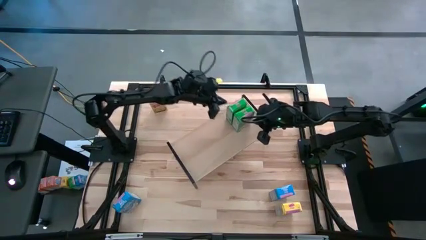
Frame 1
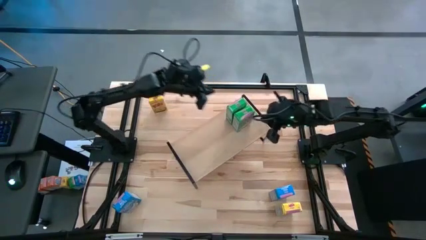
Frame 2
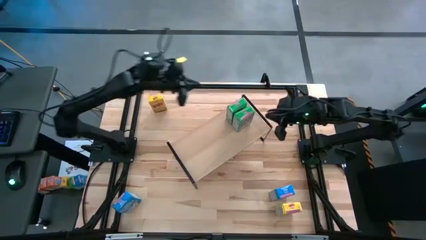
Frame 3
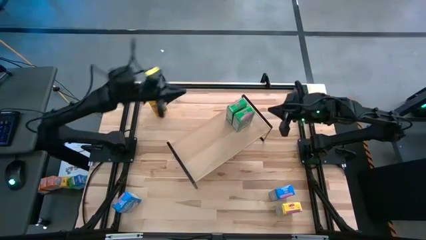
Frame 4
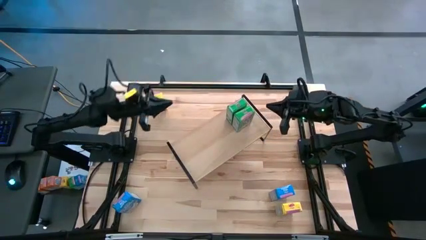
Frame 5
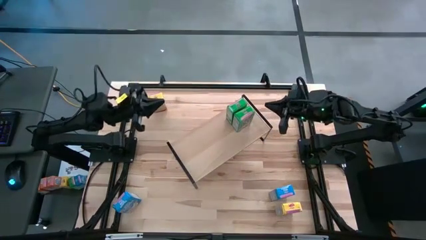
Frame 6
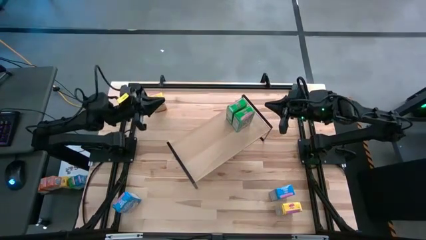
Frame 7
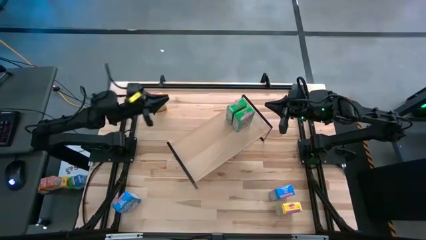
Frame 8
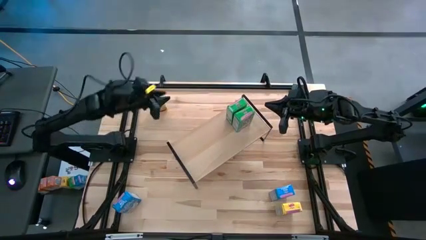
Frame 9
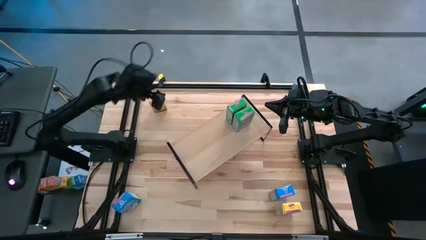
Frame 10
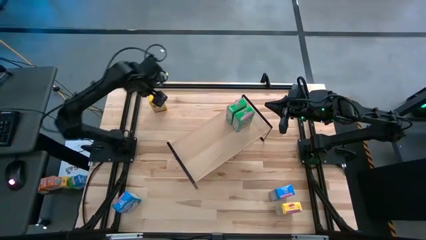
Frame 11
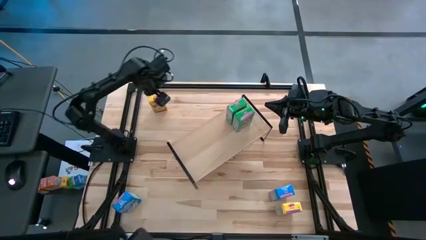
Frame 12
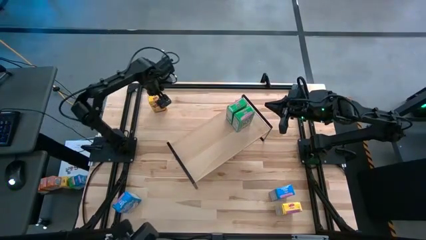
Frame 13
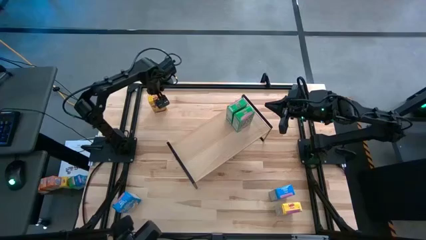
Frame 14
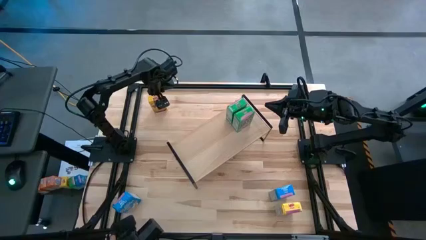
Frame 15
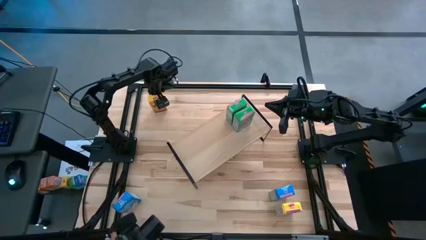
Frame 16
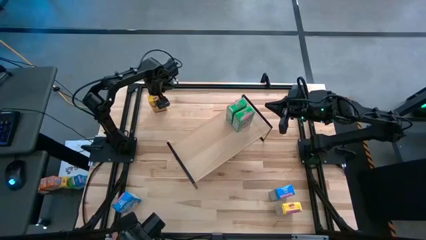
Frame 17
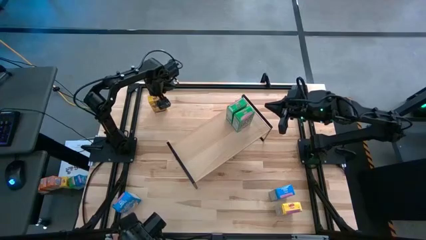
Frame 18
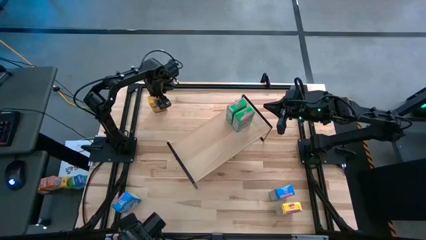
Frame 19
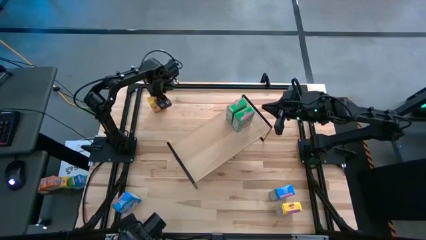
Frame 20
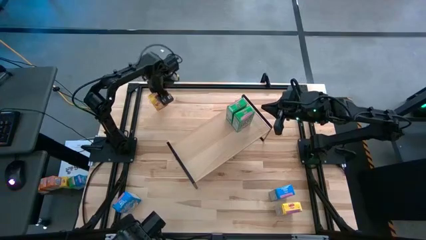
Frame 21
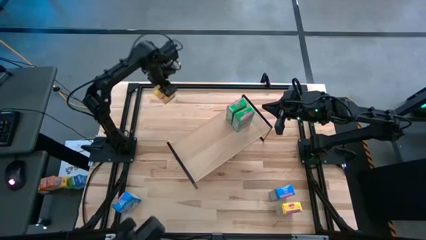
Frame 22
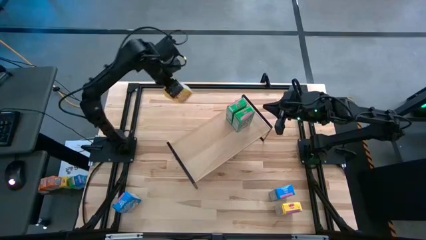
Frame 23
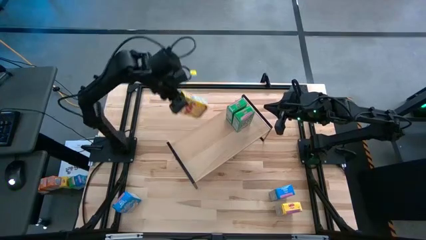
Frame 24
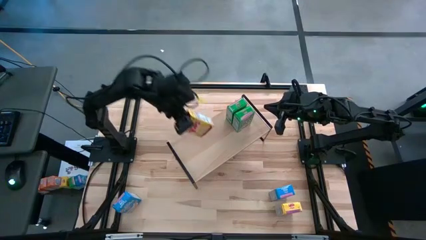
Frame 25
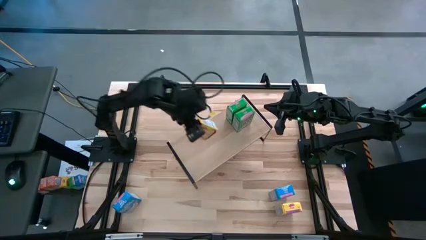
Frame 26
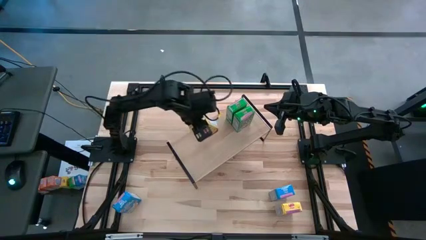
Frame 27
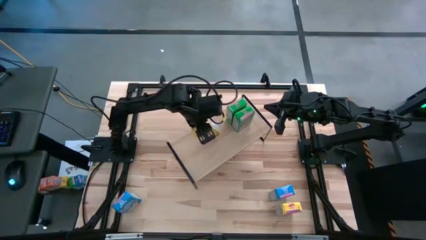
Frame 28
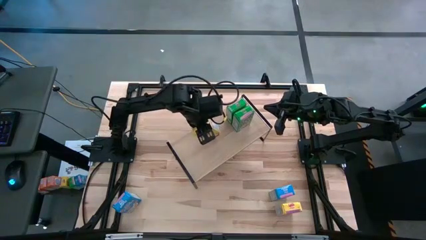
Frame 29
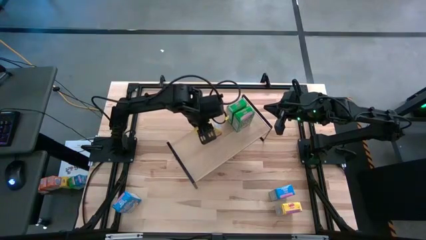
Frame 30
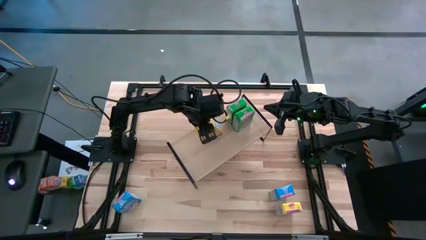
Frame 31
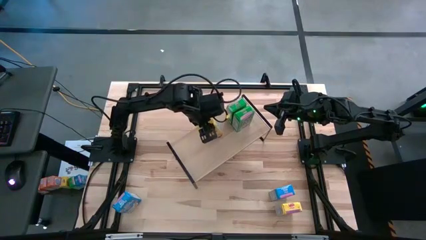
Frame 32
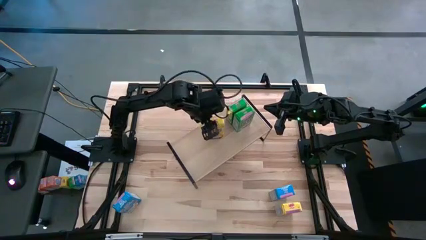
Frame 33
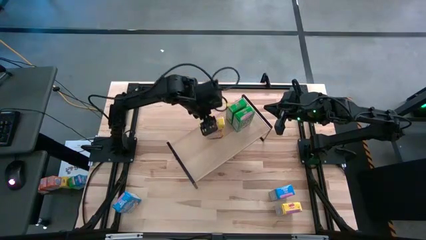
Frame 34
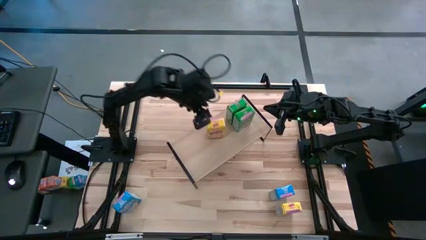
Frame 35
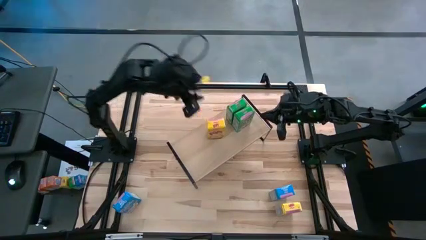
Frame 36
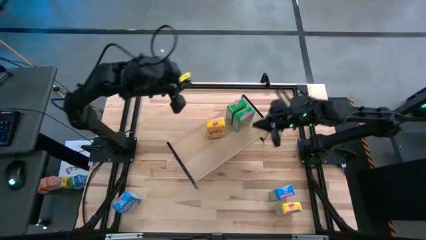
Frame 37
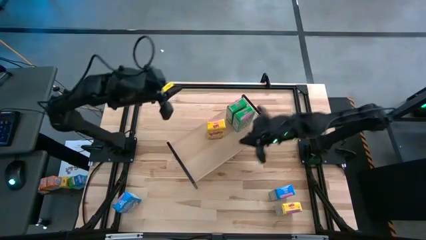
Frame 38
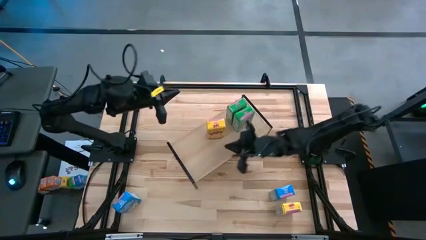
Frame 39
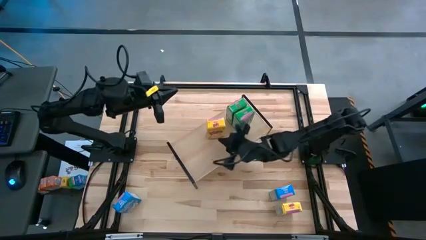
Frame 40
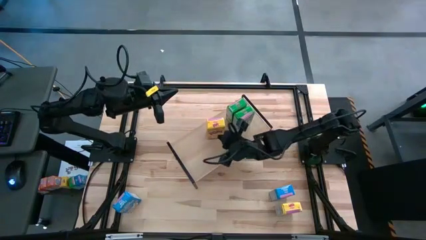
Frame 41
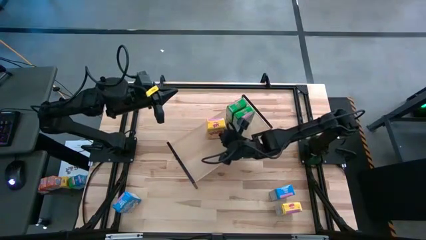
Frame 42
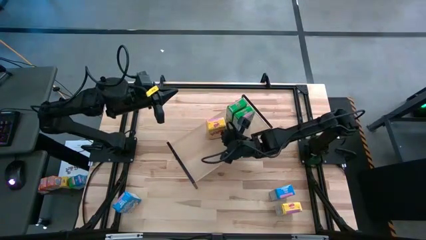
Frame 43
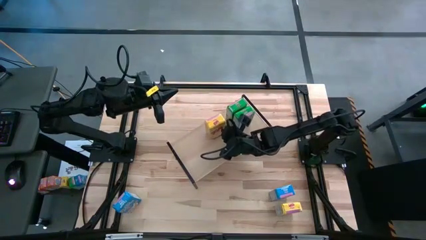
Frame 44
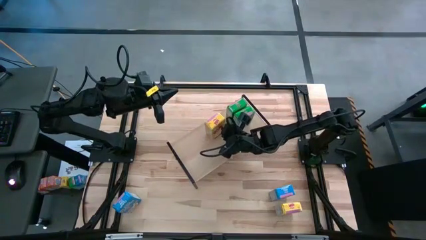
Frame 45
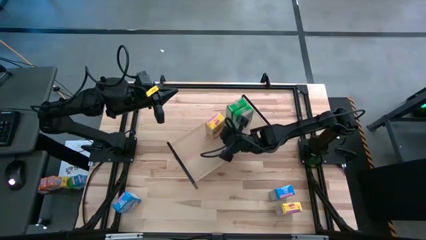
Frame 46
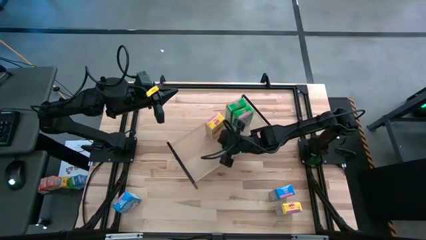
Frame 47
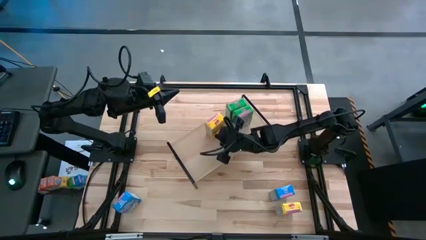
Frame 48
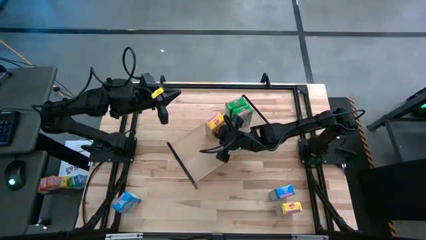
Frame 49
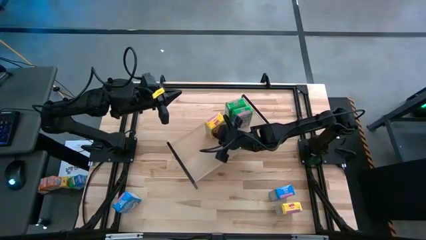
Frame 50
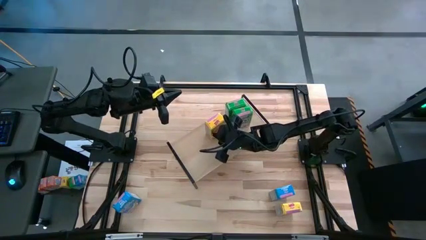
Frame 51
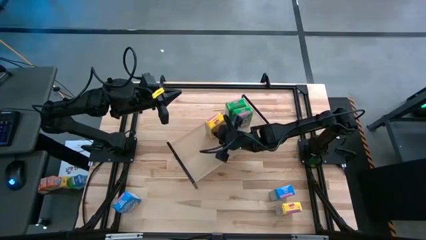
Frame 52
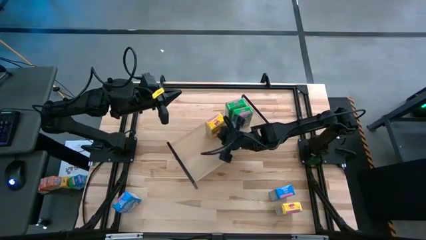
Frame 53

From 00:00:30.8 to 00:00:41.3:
Task: Stack cereal on shelf
Put the top yellow cereal box on the shelf

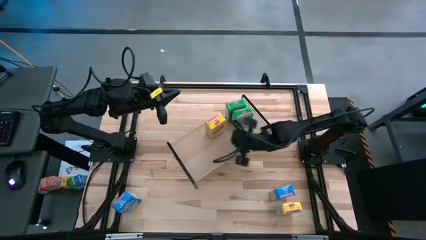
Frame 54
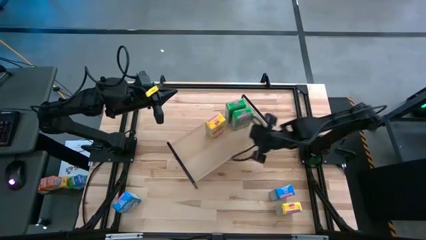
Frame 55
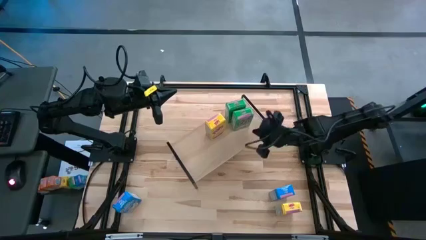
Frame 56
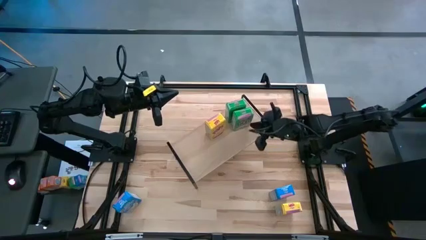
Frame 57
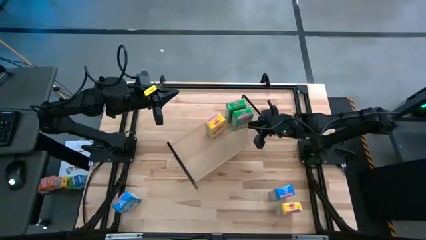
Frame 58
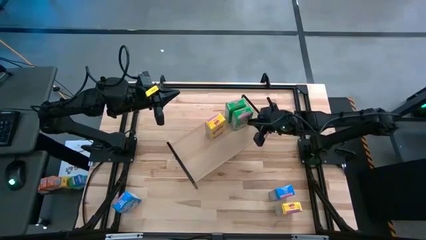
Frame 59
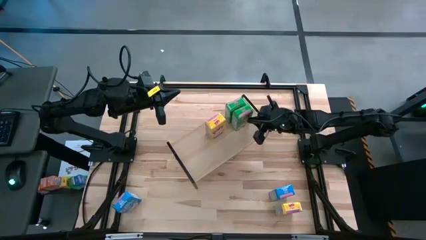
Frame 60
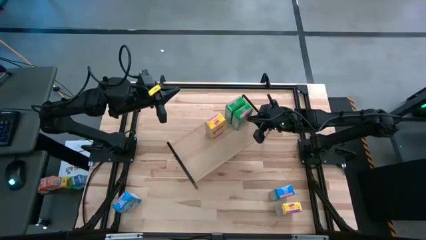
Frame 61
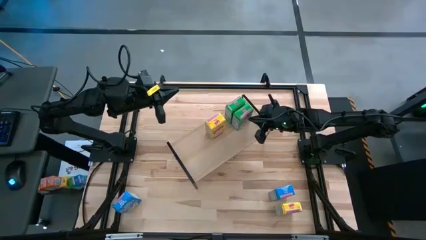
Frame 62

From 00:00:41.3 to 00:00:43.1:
Adjust the green cereal boxes on the shelf

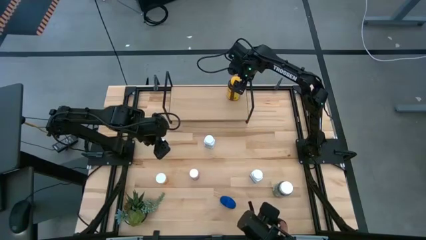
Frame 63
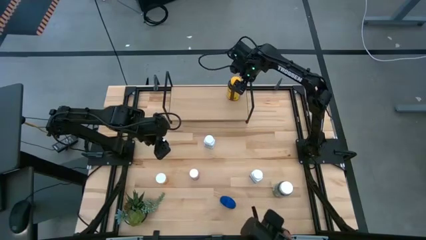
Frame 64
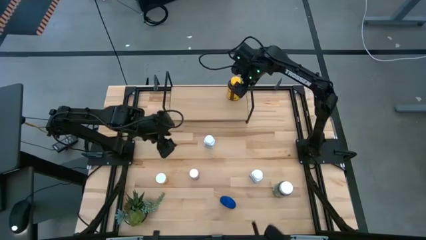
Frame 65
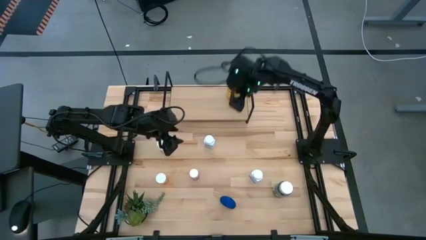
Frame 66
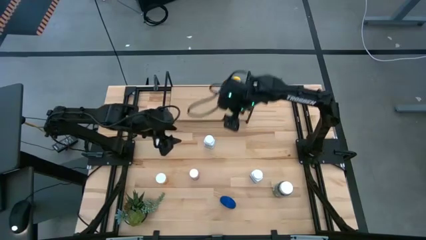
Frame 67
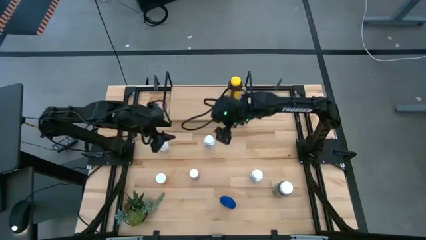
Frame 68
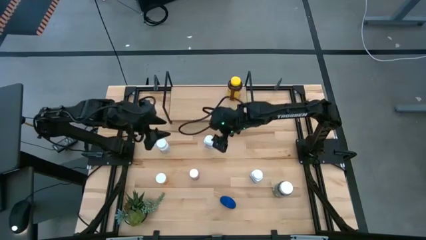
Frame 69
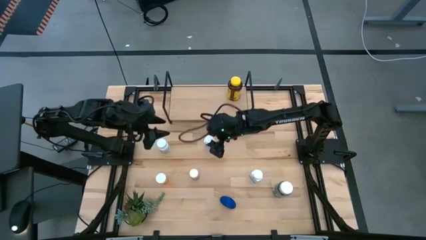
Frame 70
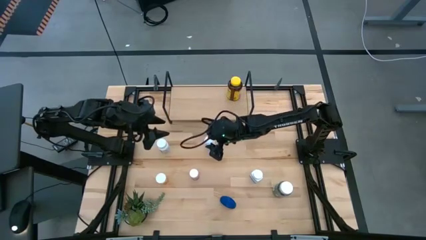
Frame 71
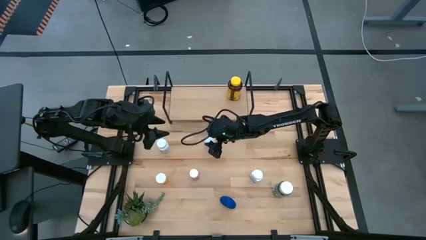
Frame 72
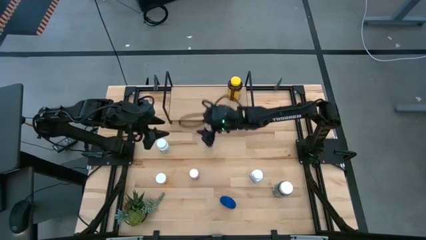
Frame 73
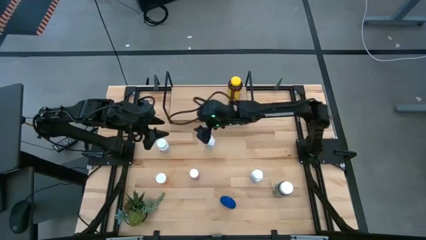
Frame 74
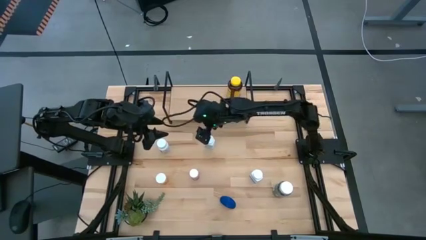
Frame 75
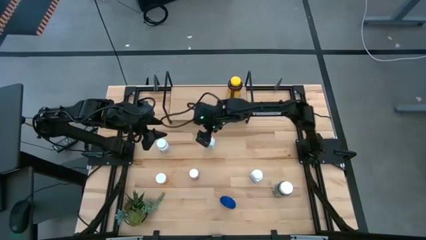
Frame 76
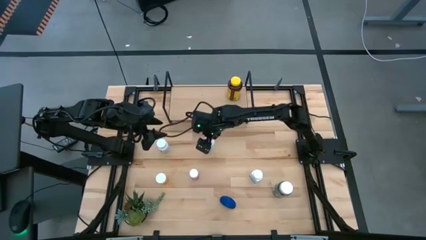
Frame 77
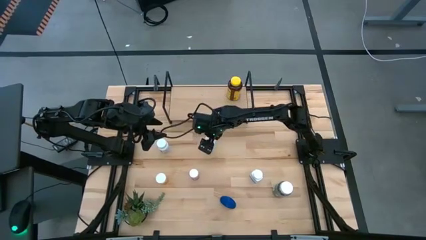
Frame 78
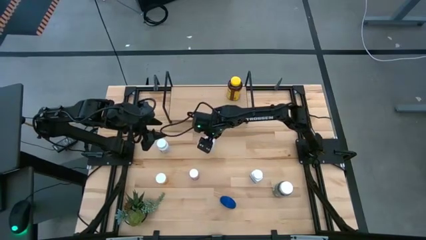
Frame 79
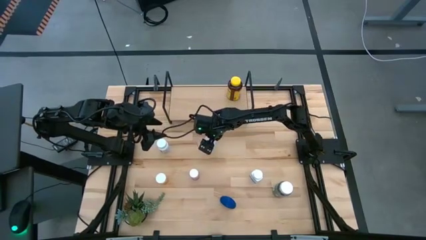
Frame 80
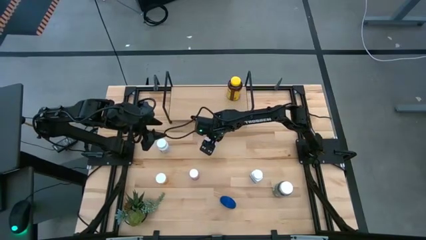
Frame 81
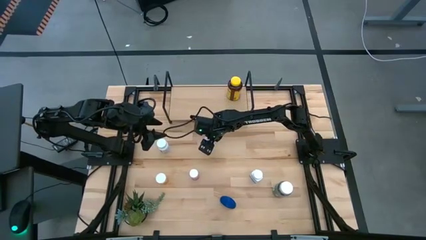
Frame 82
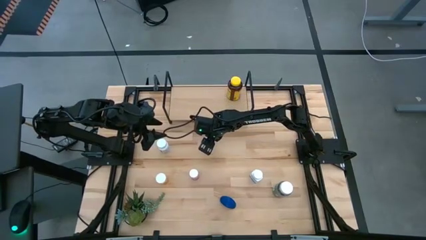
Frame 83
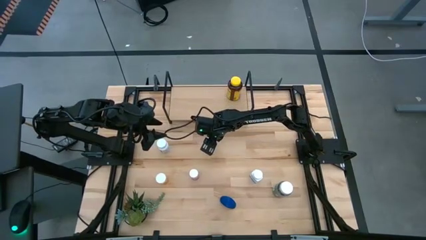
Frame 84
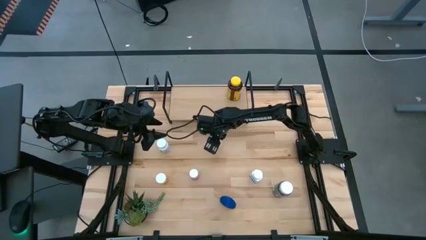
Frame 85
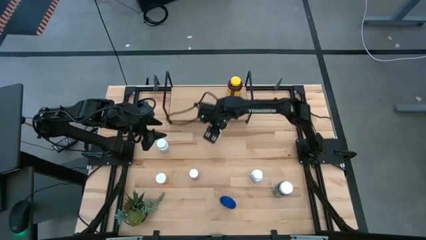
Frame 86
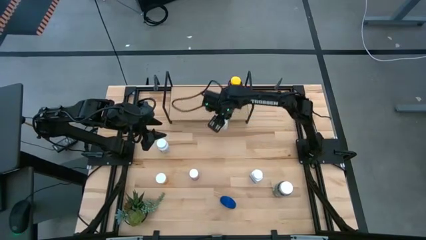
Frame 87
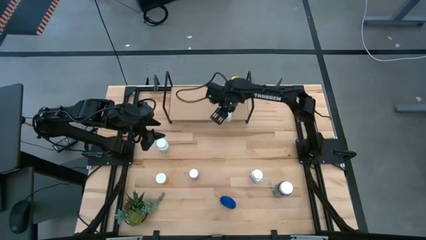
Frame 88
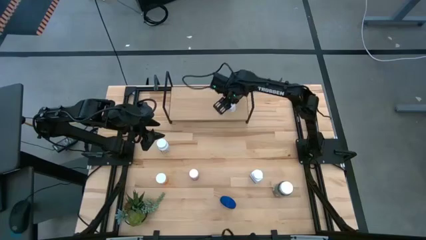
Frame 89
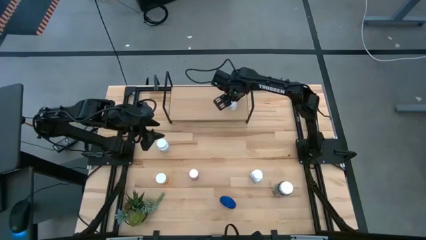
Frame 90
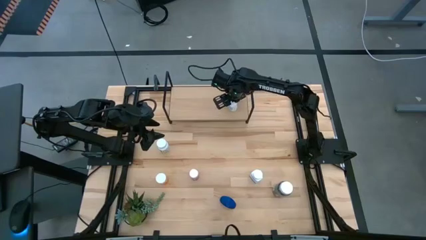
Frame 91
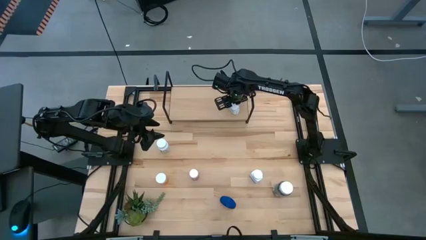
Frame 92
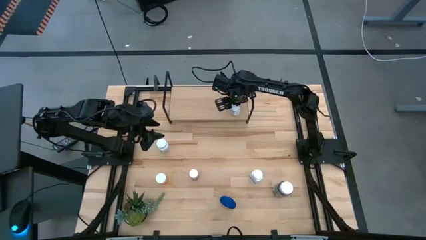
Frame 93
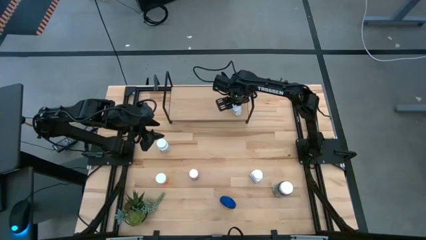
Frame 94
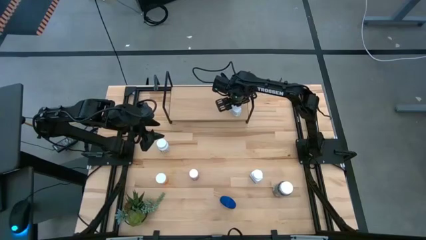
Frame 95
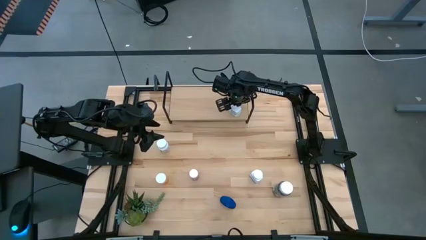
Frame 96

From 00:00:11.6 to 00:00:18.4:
Task: Pick and place medicine bottles onto shelf by color
Put the middle white pill bottle on the shelf
